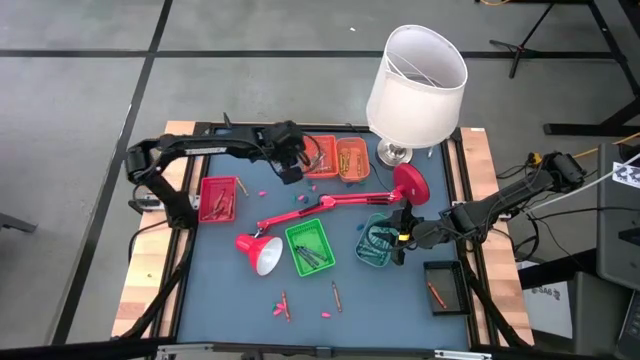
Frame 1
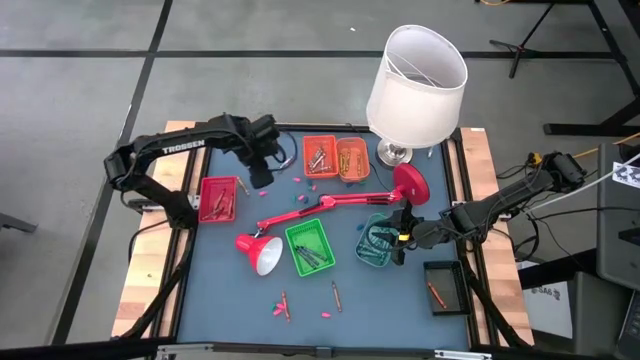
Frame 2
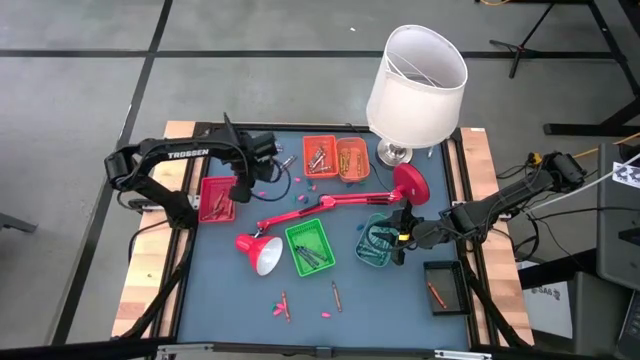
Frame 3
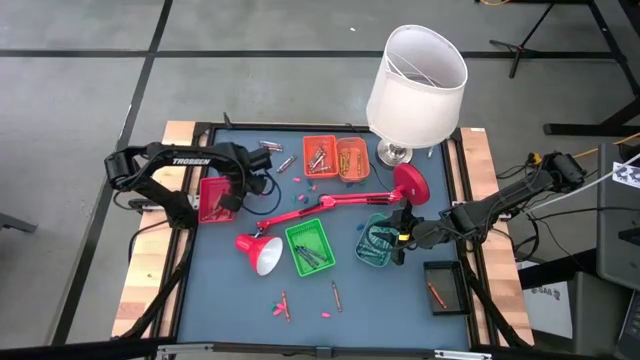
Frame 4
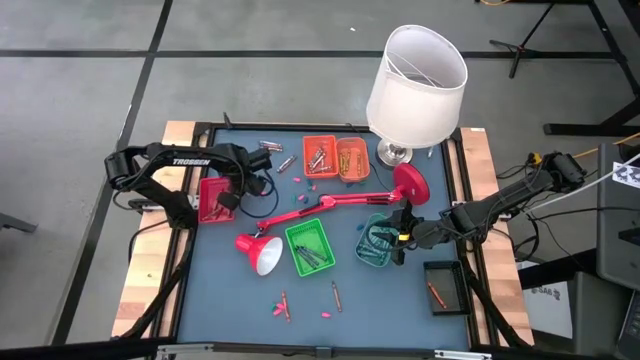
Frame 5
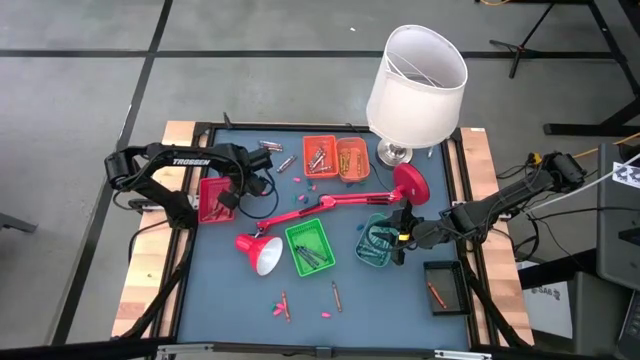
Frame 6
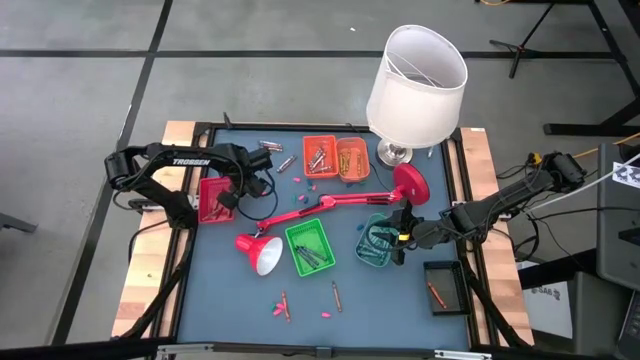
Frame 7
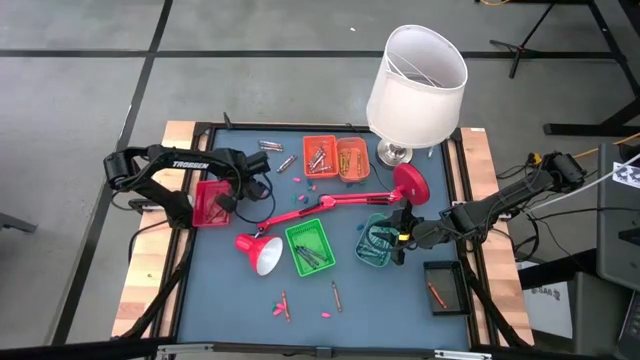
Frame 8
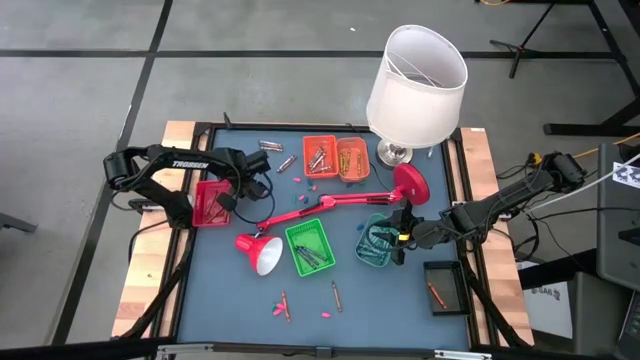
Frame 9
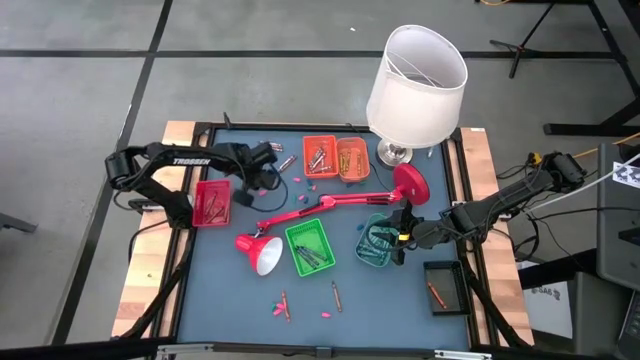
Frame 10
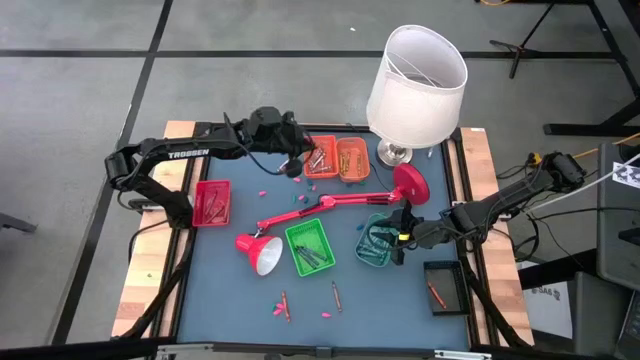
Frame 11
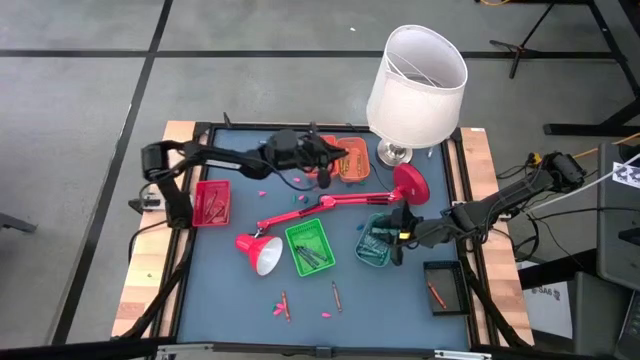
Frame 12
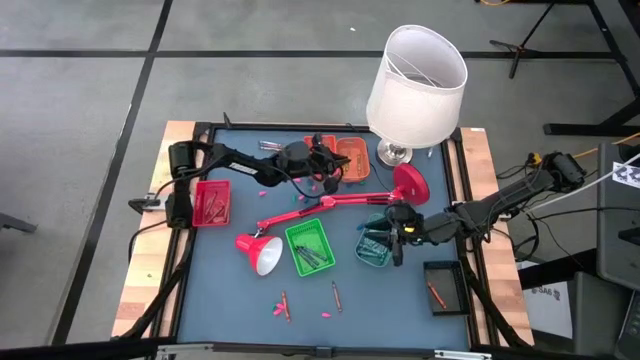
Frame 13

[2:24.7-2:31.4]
Task: Sort crayons
Put the yellow crayon into the light orange bin

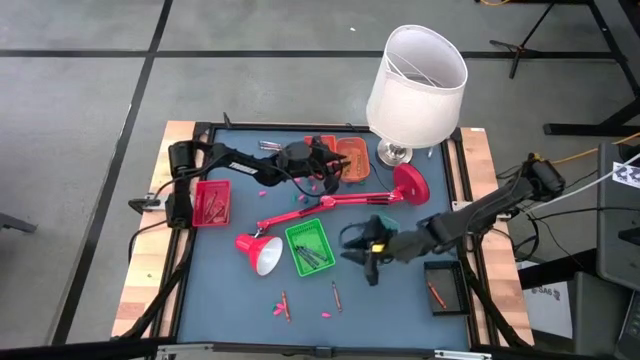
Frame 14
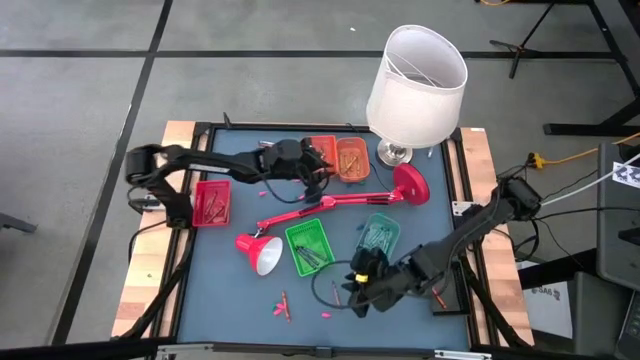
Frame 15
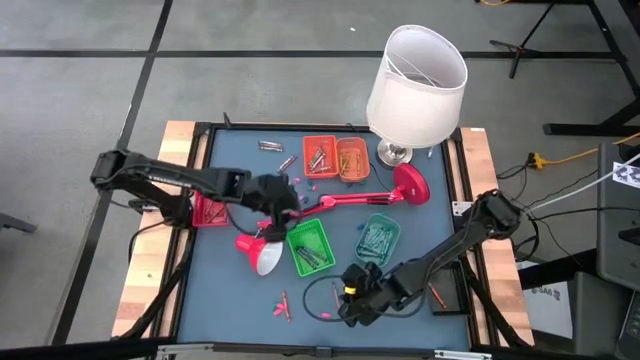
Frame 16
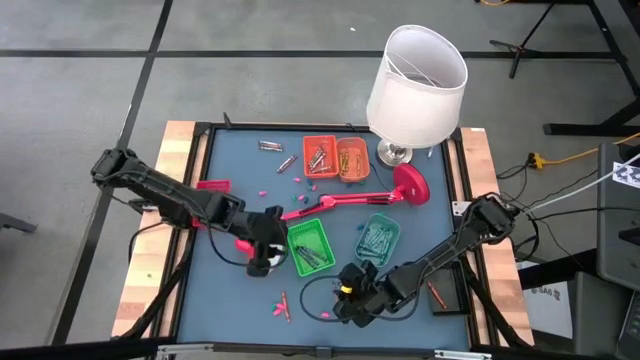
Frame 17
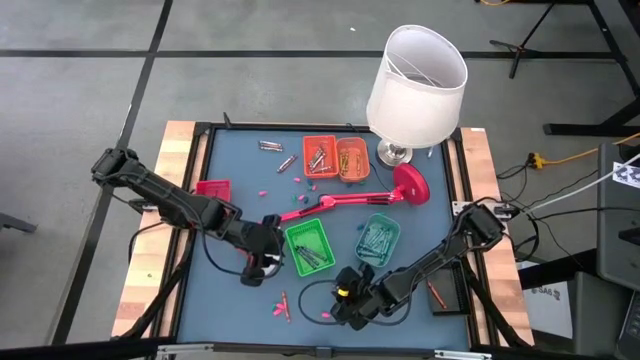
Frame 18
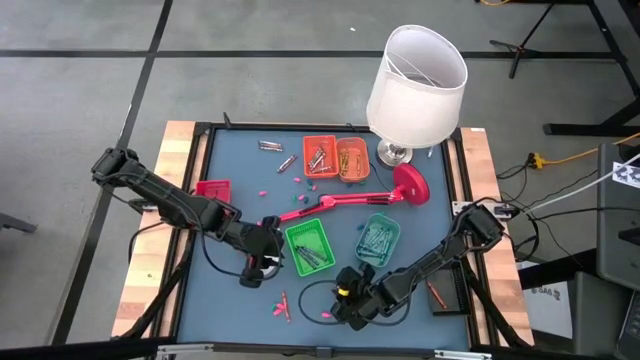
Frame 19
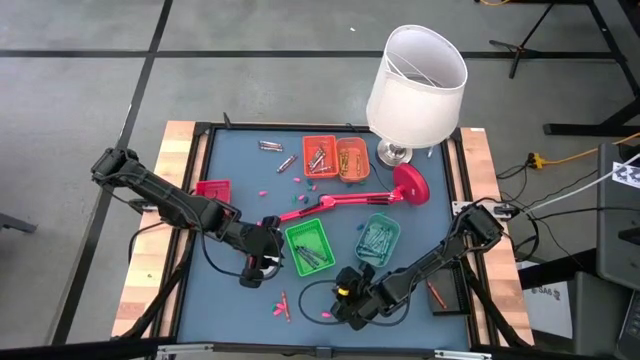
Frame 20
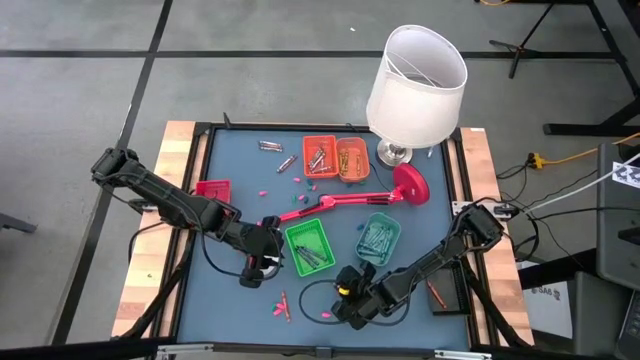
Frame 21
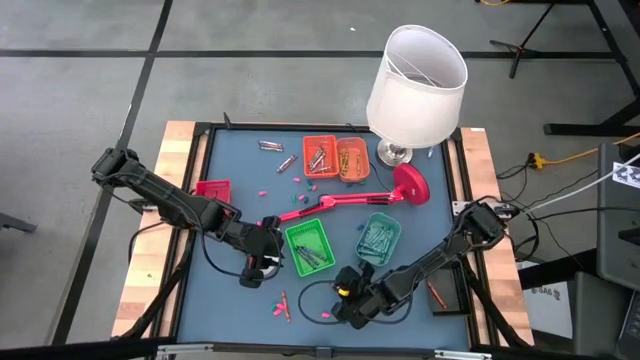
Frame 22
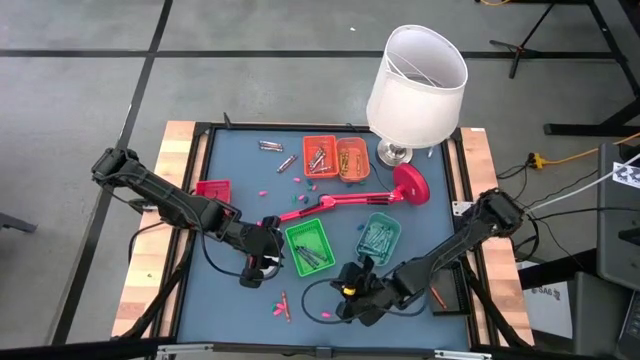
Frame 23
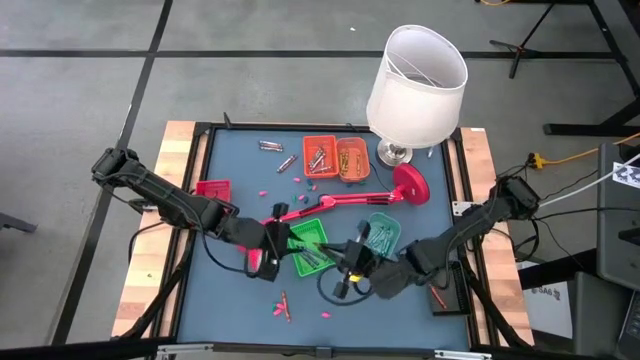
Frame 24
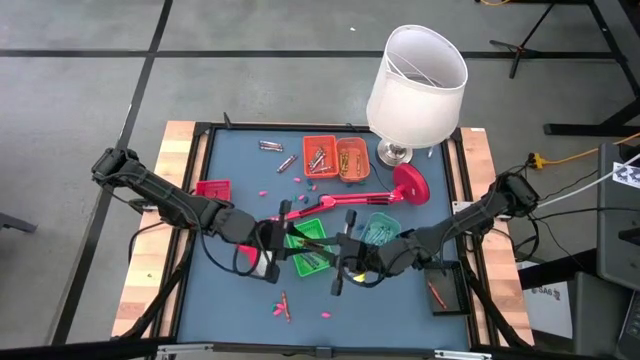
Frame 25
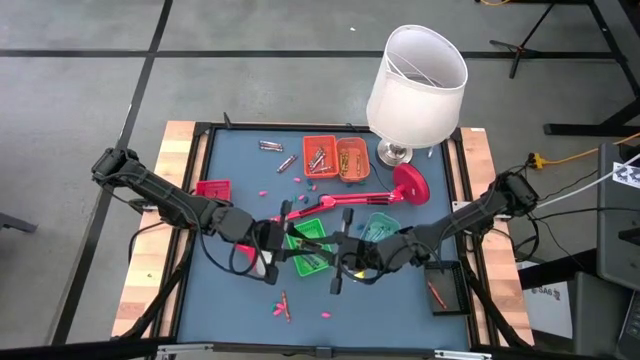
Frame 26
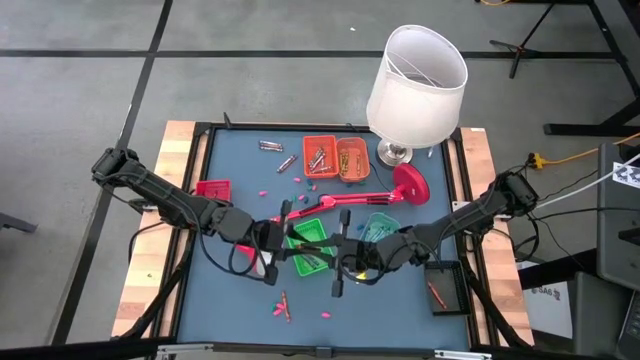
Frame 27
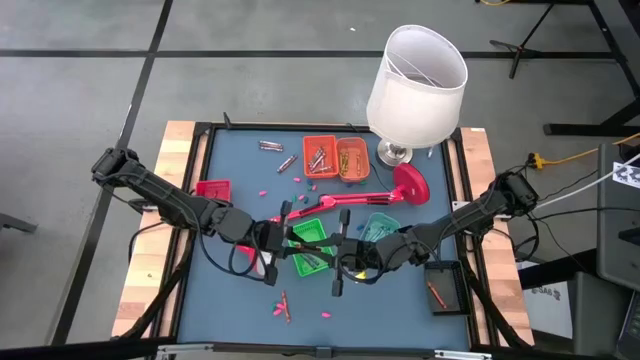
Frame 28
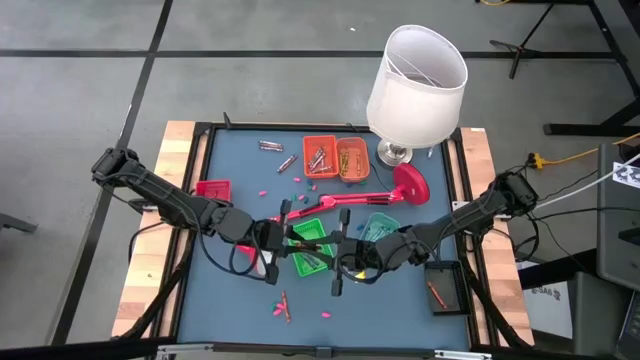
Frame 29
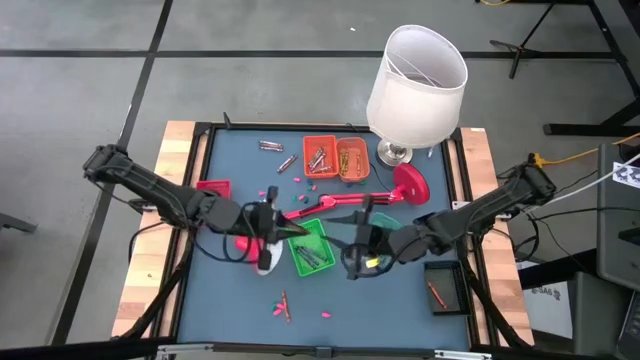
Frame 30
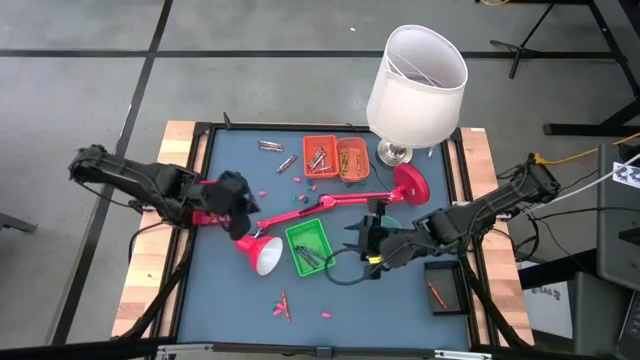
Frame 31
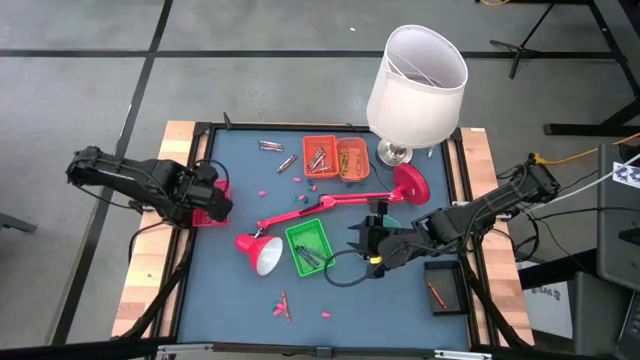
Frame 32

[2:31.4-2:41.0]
Put the brown crayon into the red bin

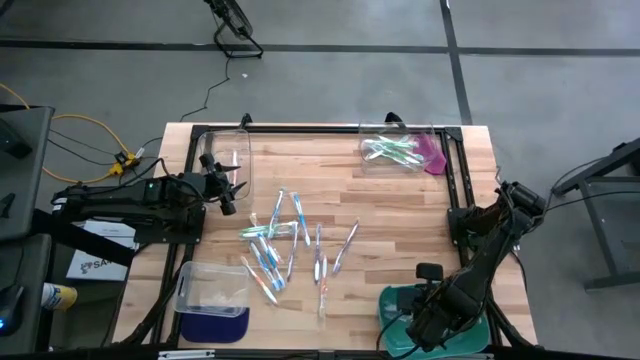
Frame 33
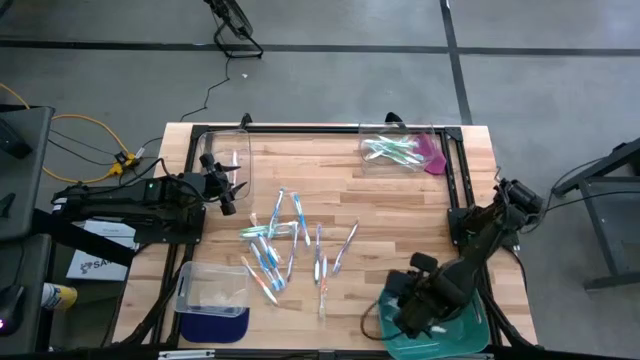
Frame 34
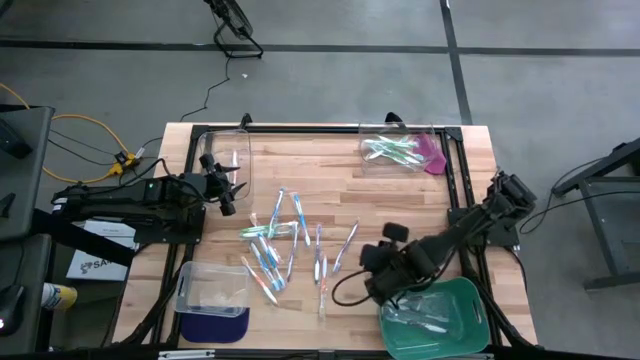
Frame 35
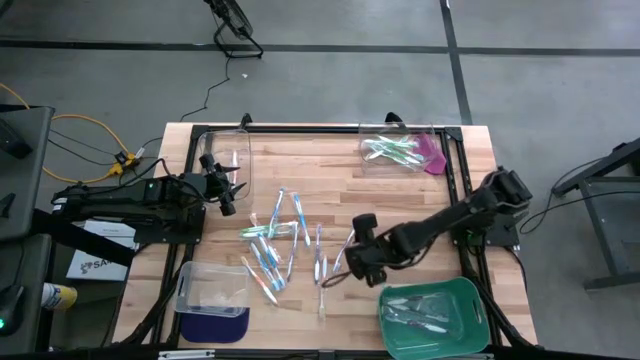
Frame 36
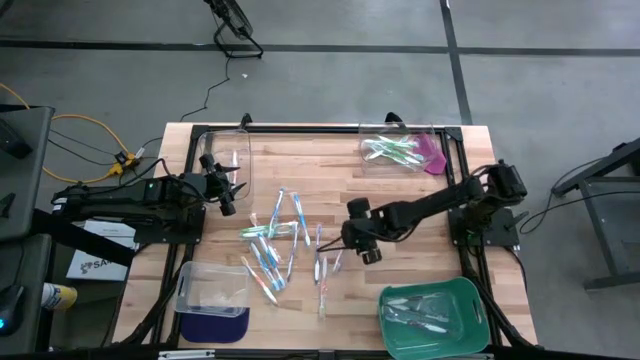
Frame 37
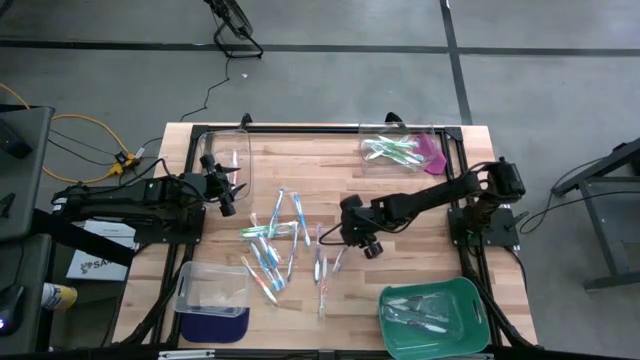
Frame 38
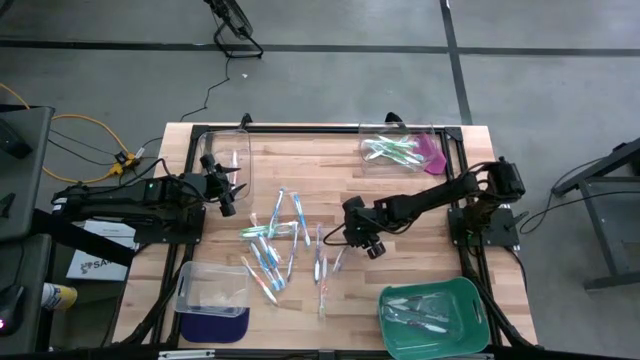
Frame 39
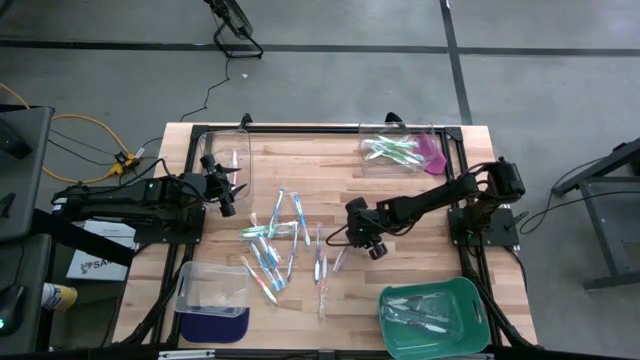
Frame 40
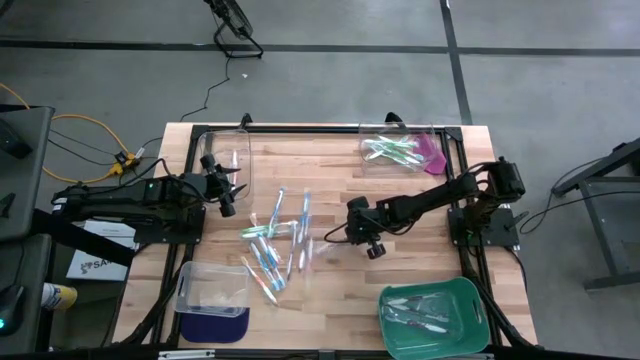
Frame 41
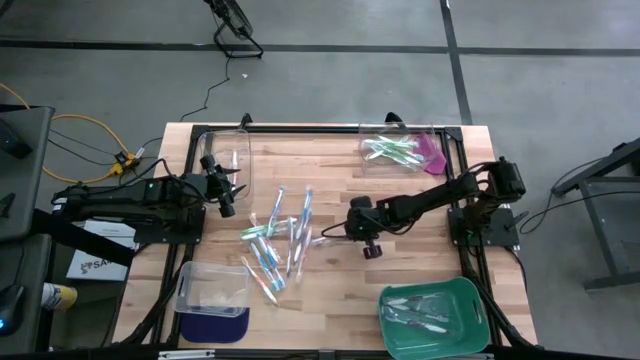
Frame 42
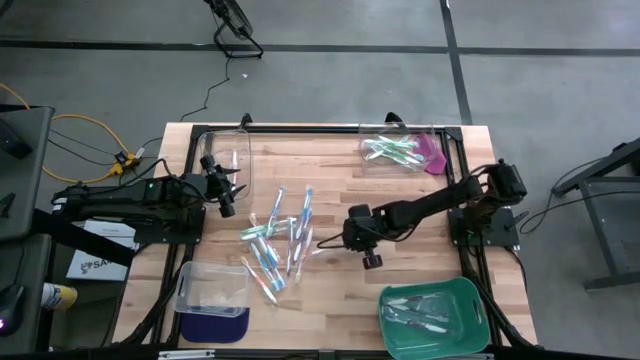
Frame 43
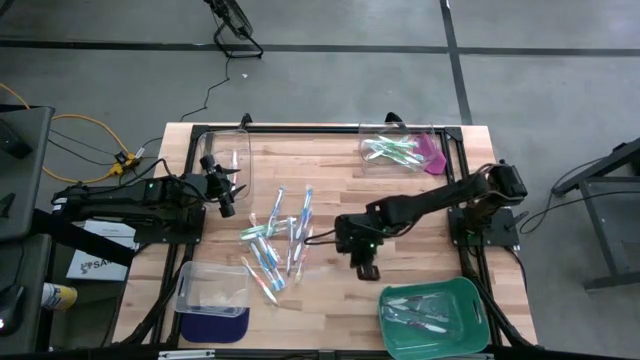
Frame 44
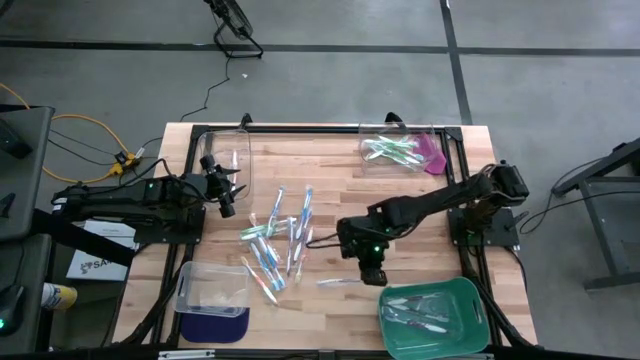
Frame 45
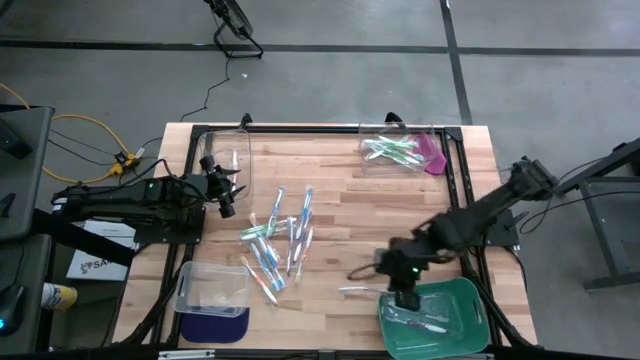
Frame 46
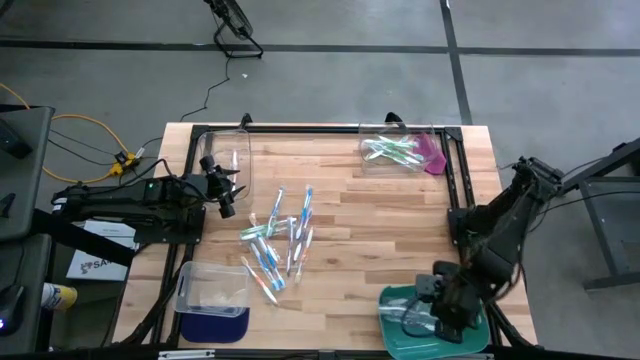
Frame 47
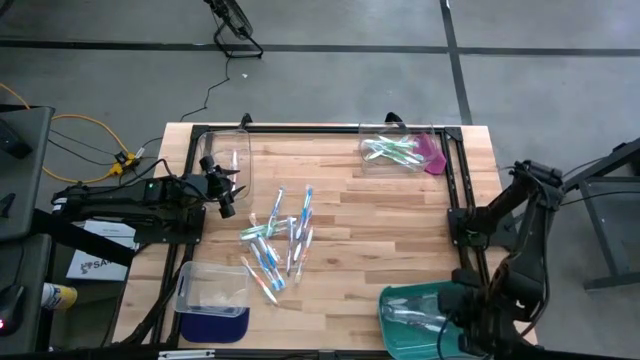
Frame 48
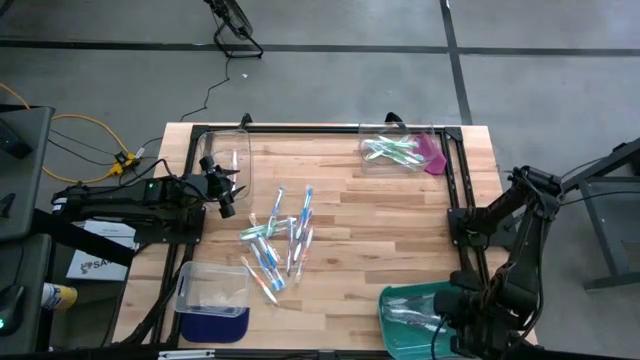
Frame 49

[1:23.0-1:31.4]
Task: Pick & Place Toothbrushes
Put the violet toothbrush into the green bin
